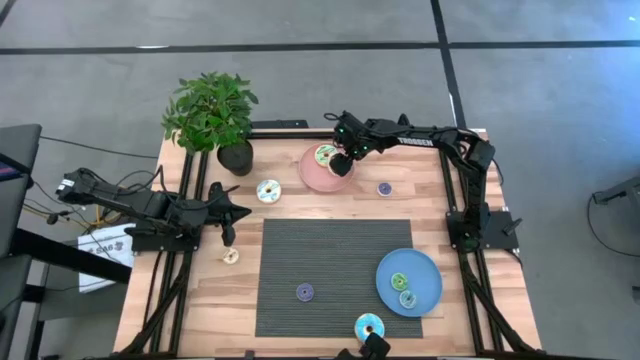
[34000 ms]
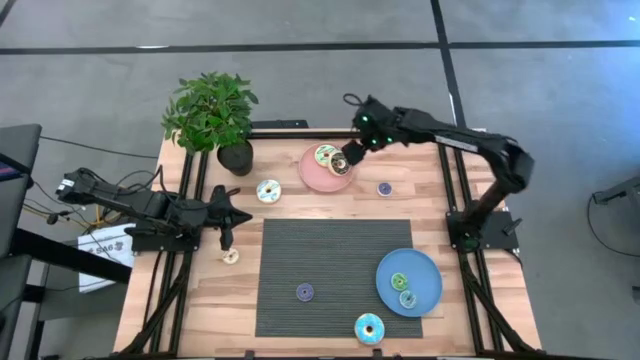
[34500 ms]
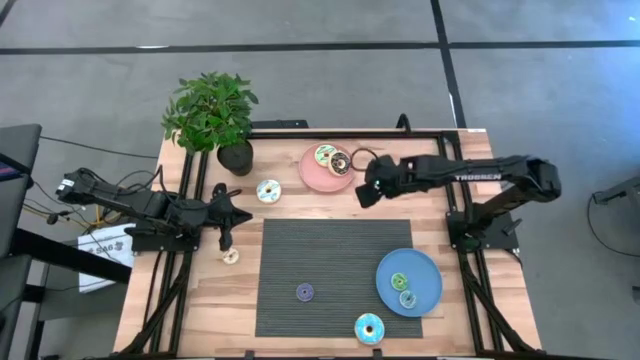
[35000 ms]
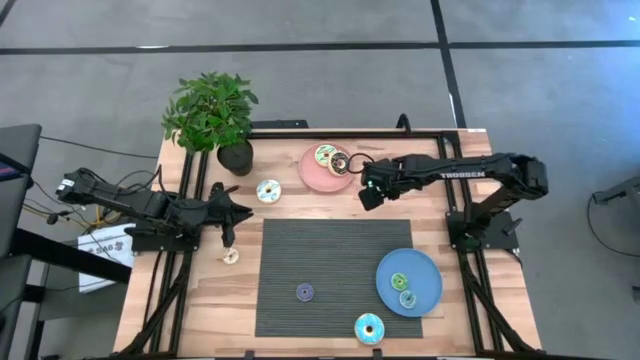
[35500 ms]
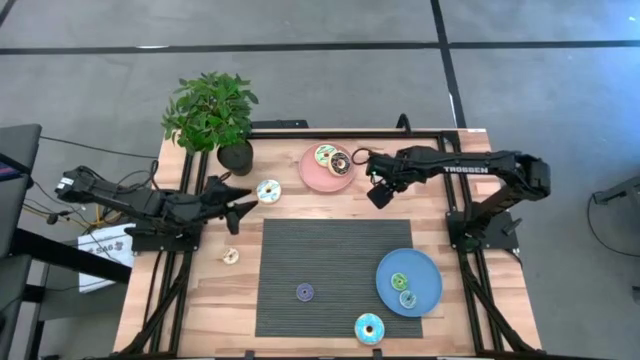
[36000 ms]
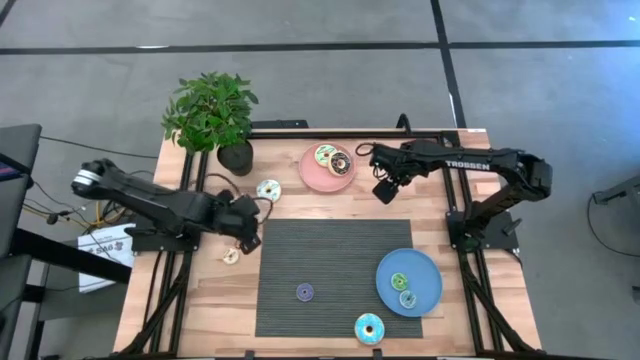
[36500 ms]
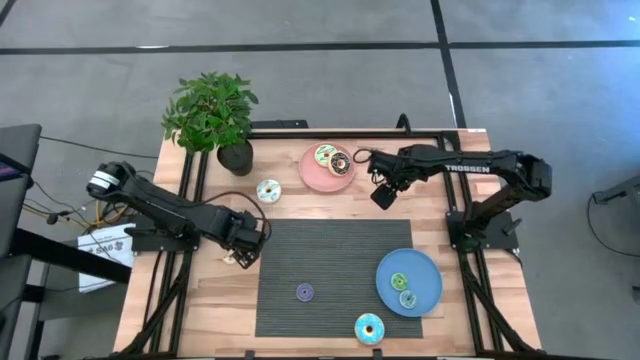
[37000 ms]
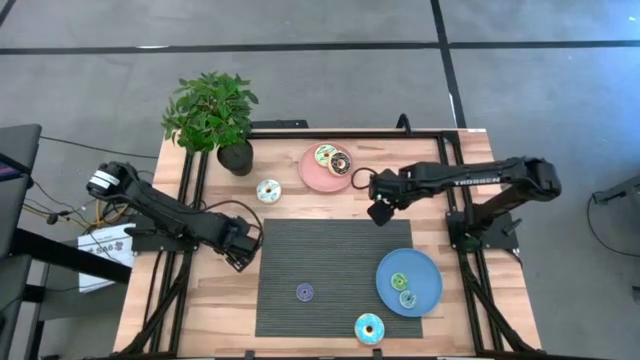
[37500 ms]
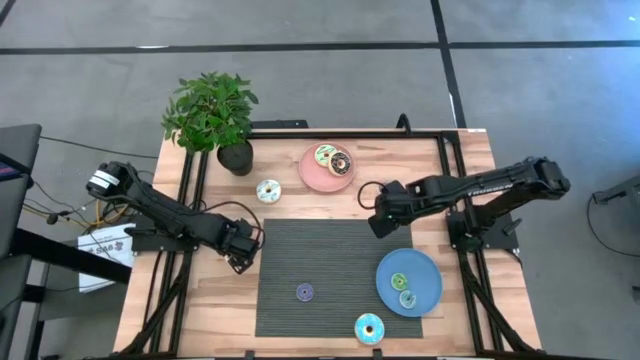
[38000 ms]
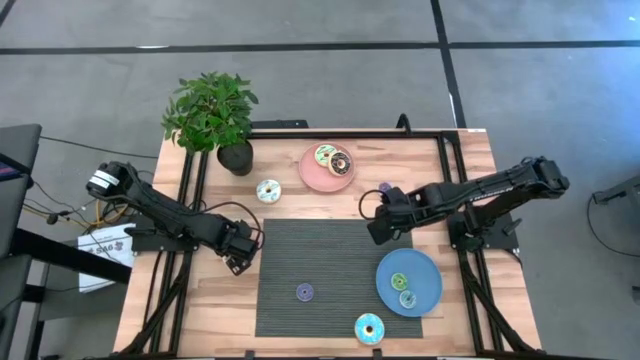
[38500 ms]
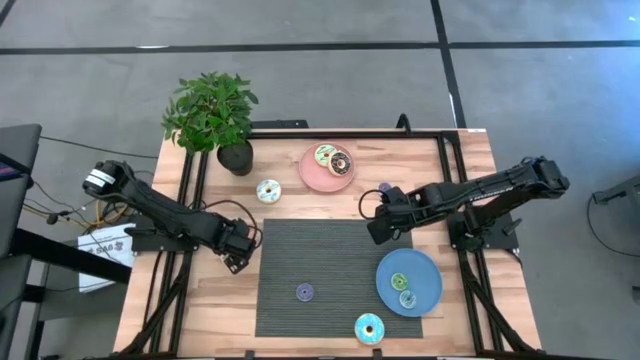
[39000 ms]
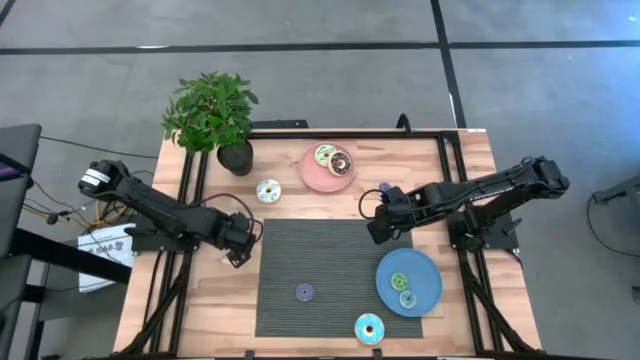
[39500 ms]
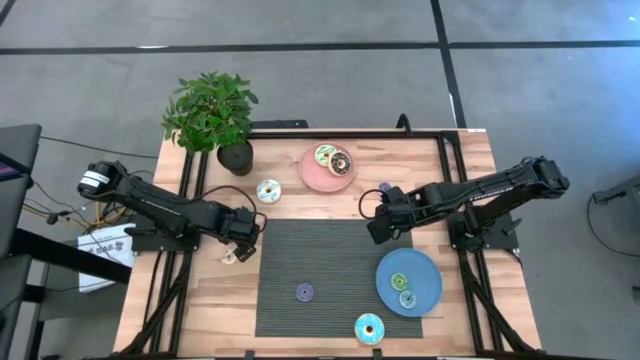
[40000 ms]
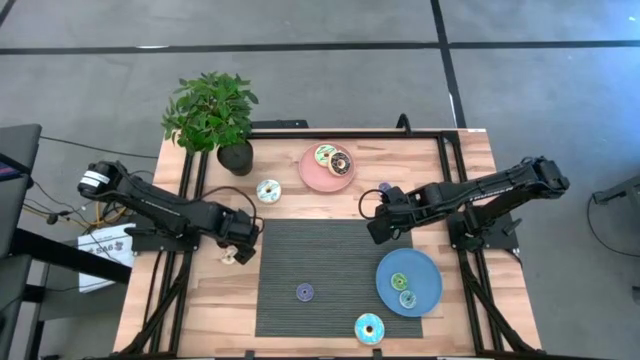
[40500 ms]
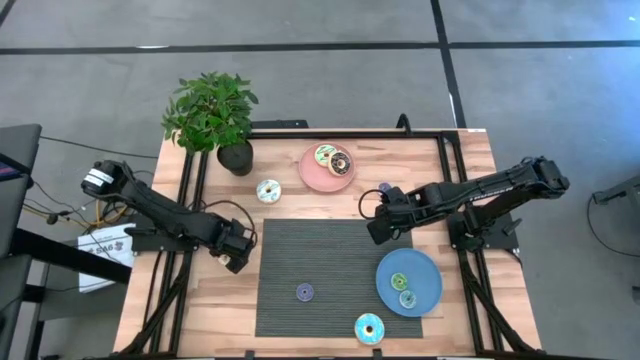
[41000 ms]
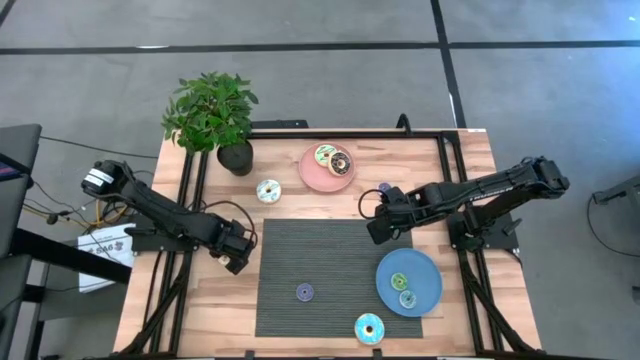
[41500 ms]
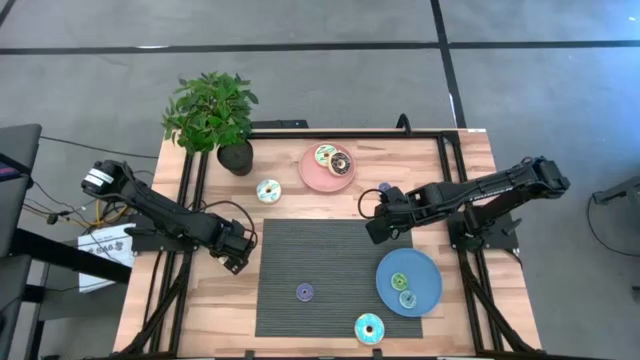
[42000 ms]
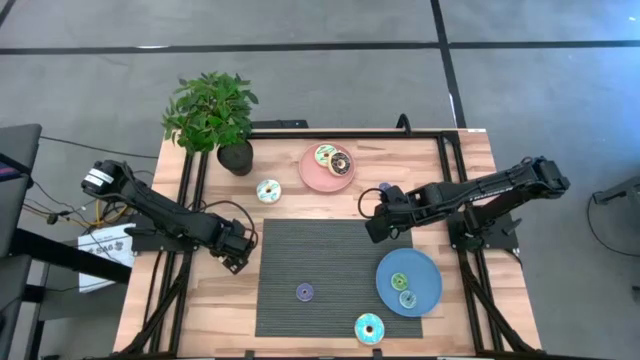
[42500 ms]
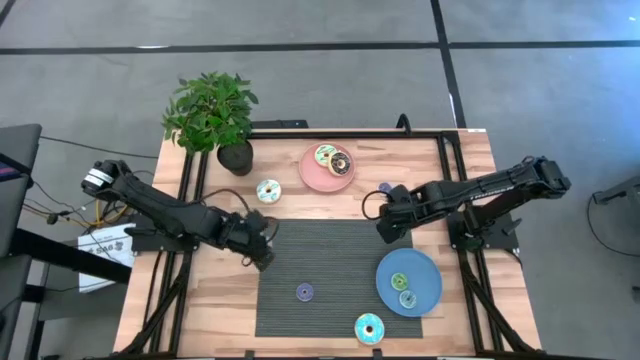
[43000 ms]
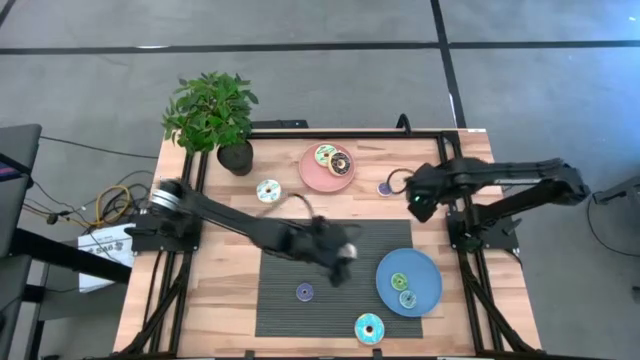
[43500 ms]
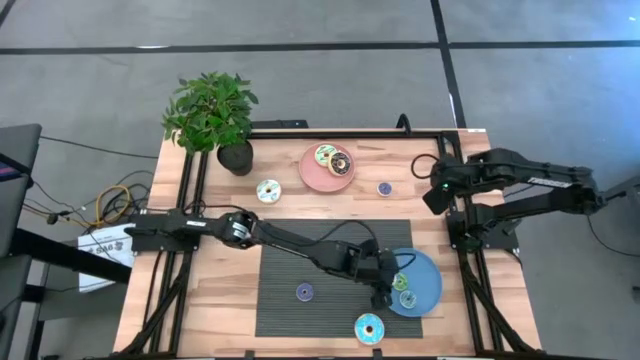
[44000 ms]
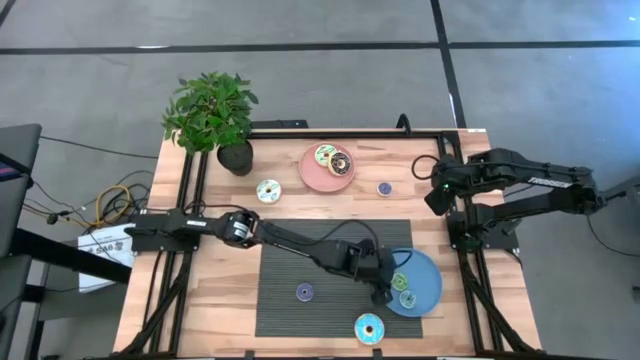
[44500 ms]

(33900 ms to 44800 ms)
Task: Pick & Place donuts
Put the small white donut on the blue plate

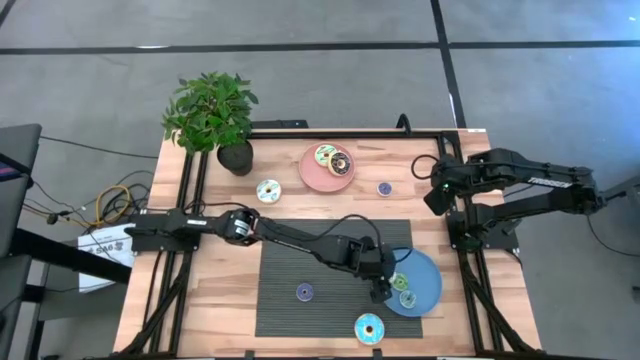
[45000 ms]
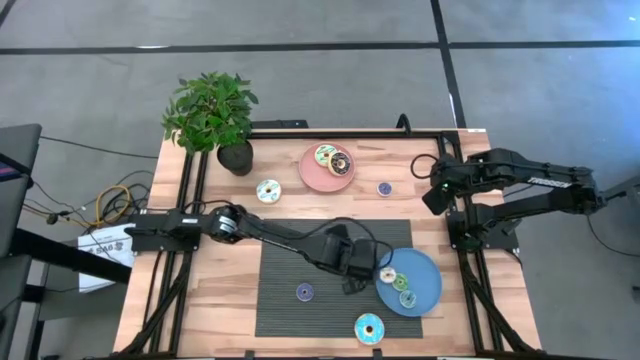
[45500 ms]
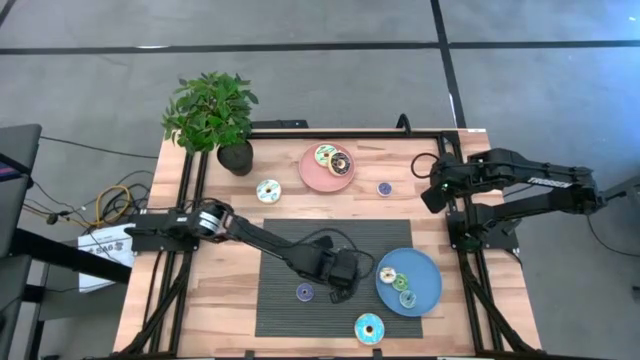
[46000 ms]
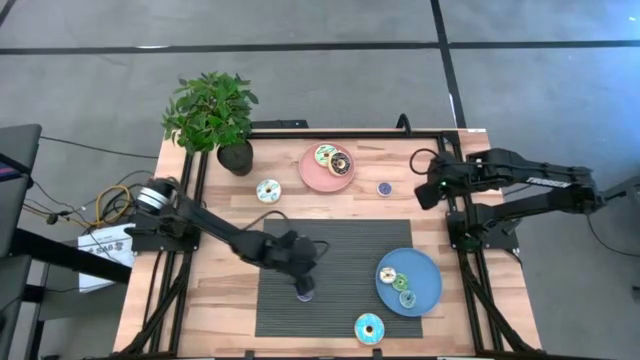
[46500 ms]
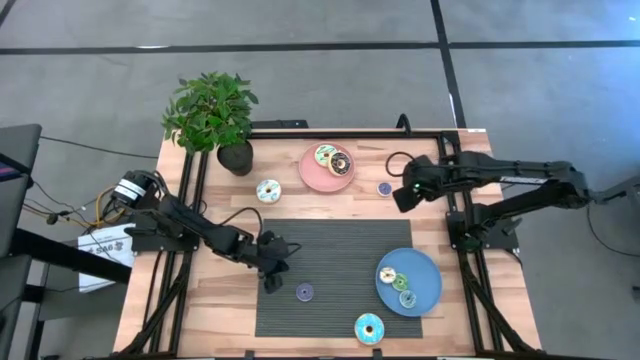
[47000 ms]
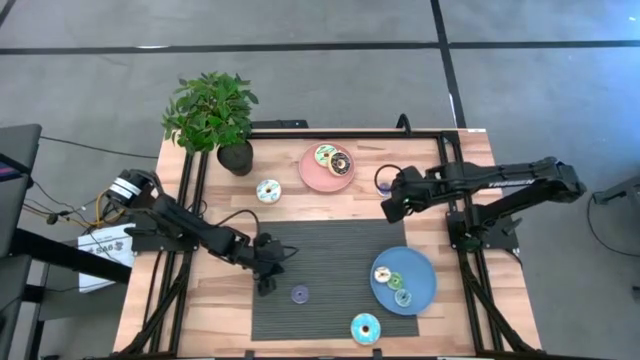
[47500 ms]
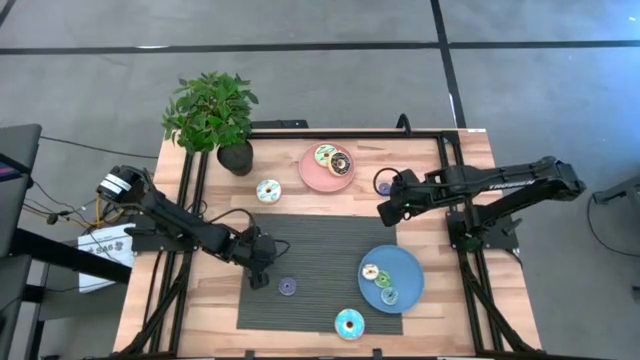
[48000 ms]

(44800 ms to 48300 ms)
Adjust the gray table mat

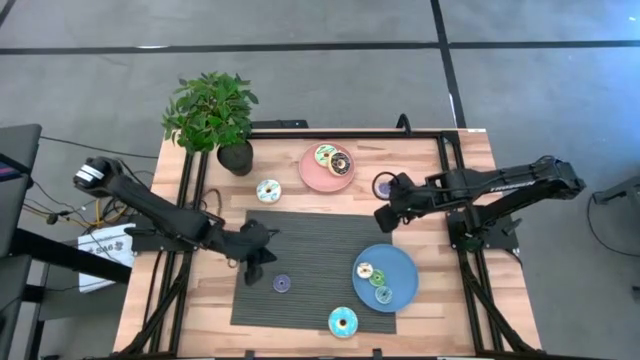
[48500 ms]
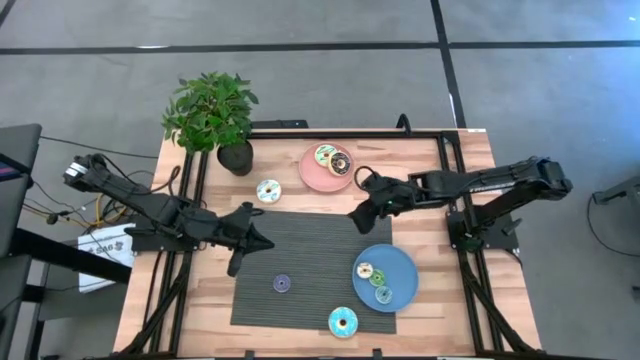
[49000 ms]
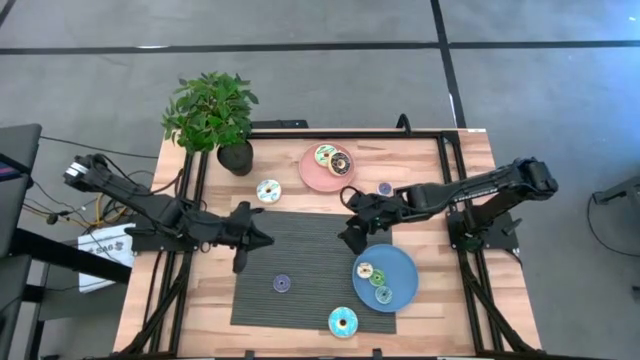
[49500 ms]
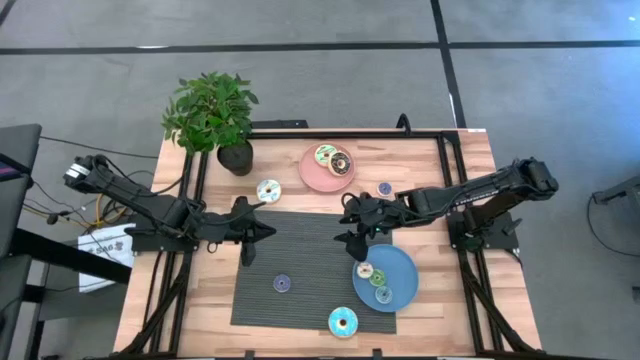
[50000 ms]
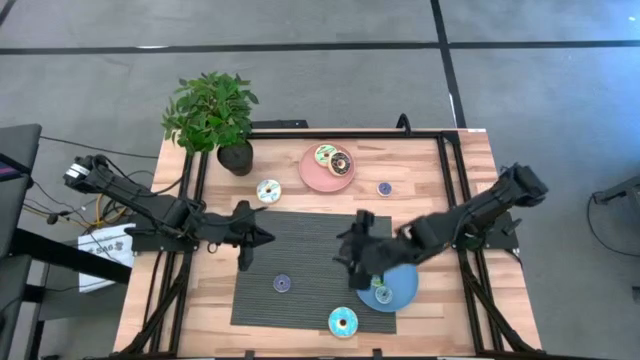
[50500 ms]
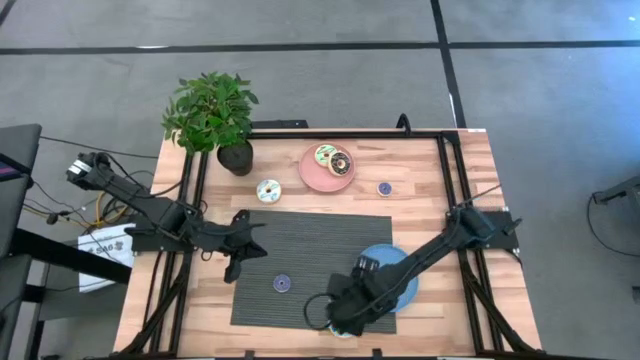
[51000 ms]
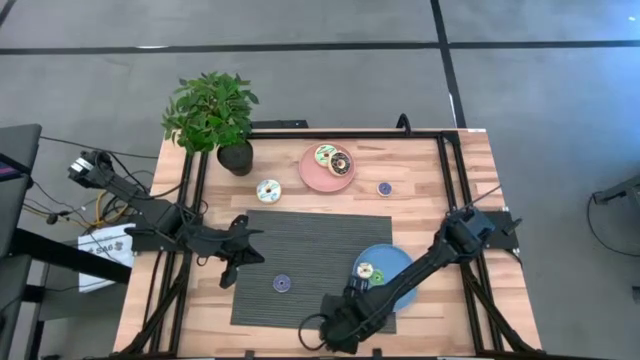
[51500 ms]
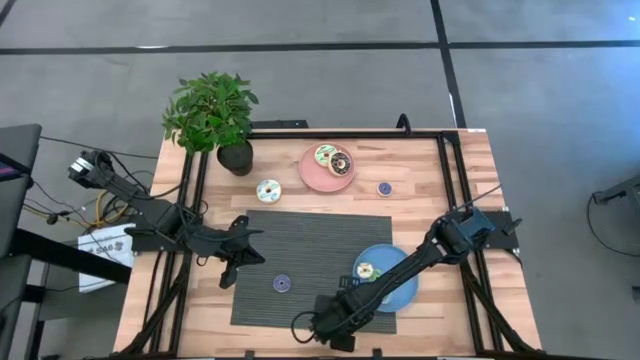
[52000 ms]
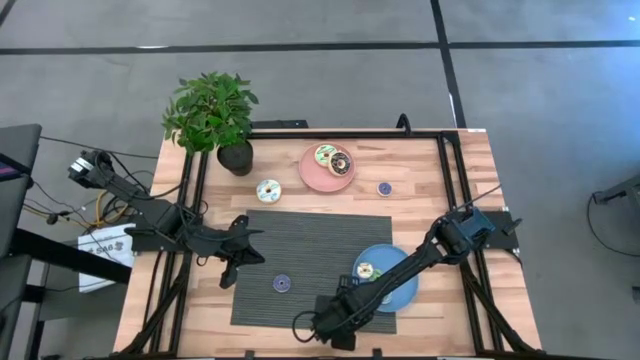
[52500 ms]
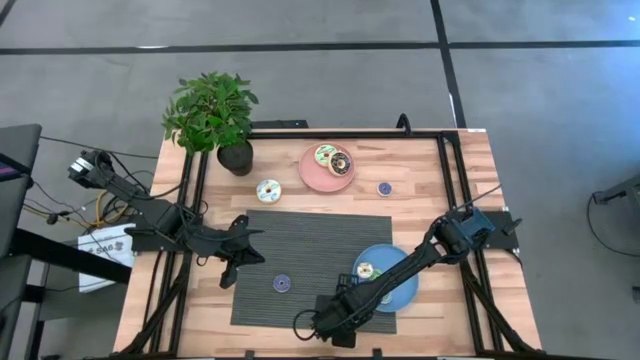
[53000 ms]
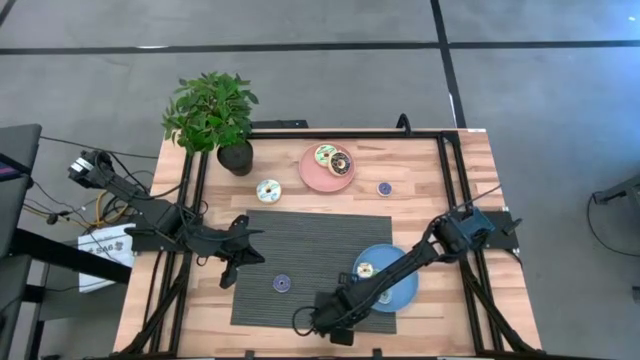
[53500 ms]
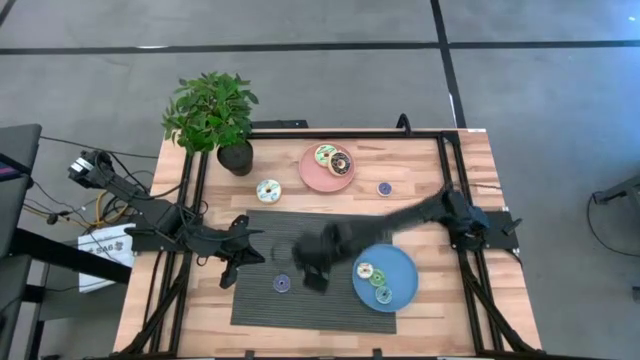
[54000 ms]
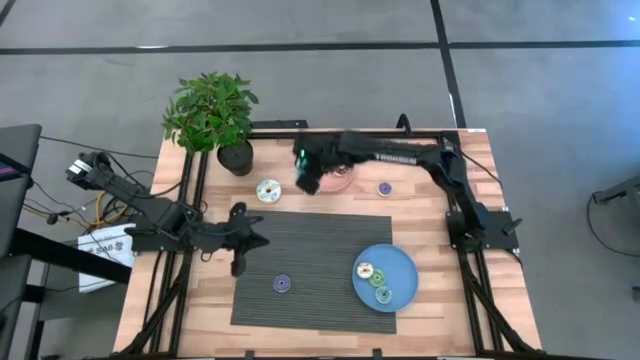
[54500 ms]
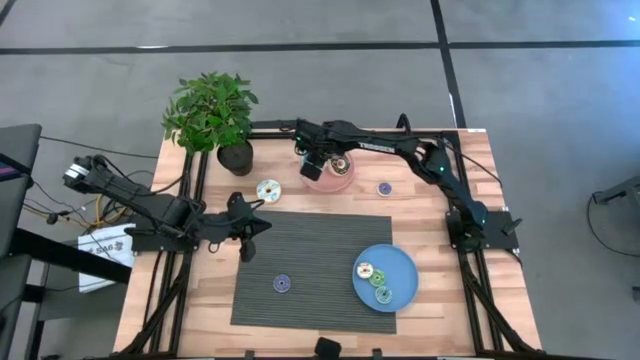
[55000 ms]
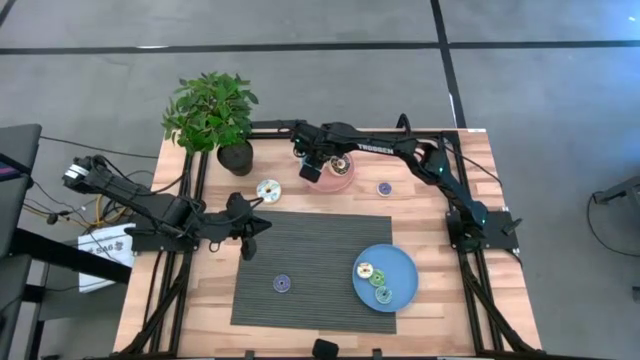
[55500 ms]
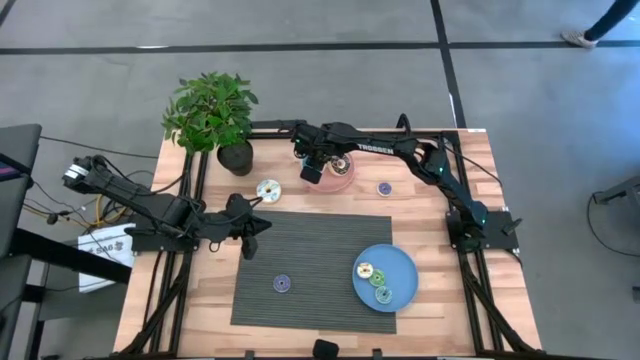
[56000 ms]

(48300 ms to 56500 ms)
Put the large light blue donut on the pink plate
